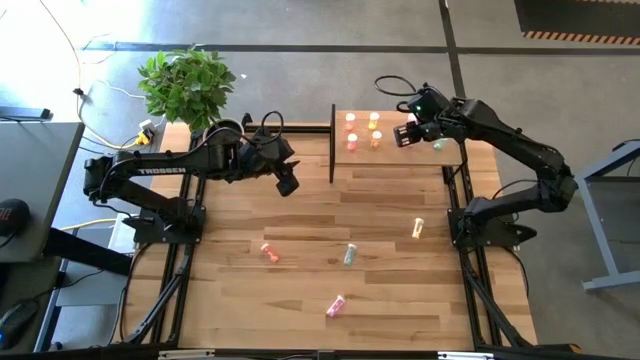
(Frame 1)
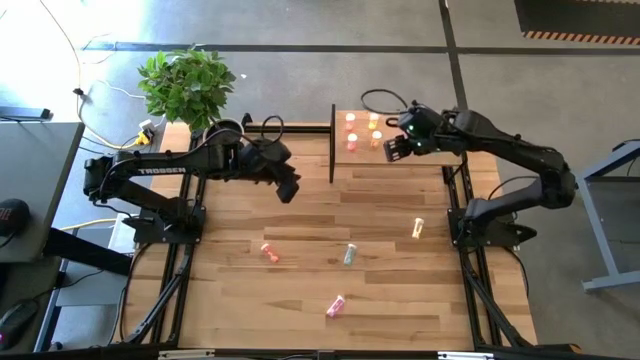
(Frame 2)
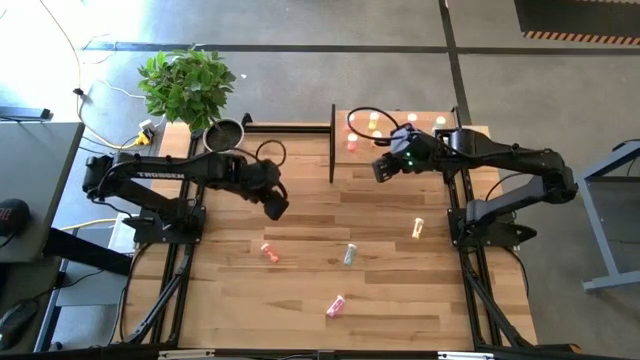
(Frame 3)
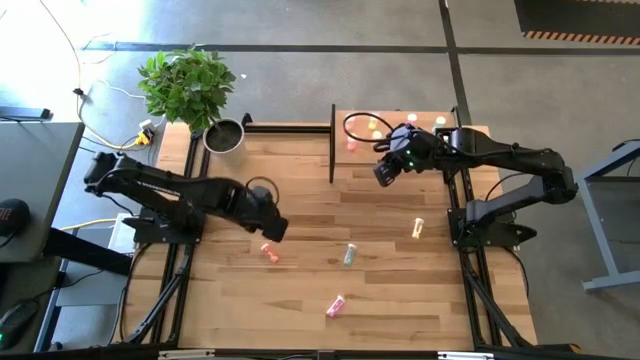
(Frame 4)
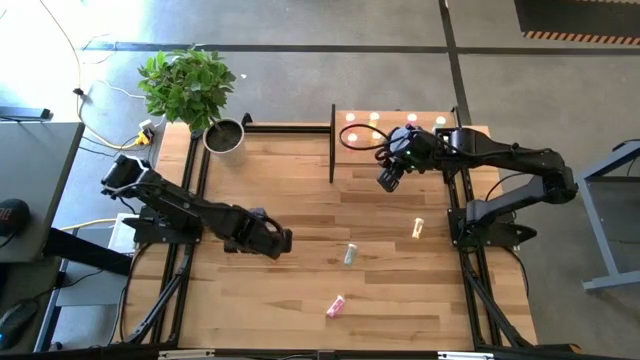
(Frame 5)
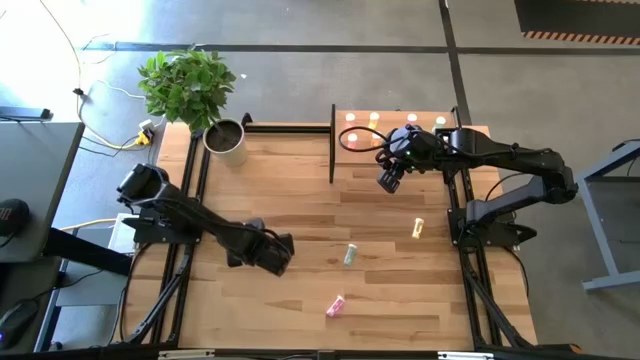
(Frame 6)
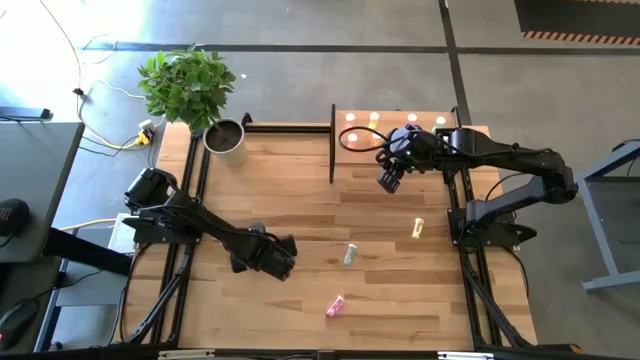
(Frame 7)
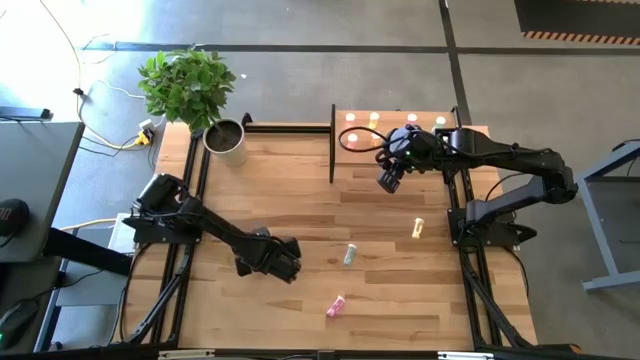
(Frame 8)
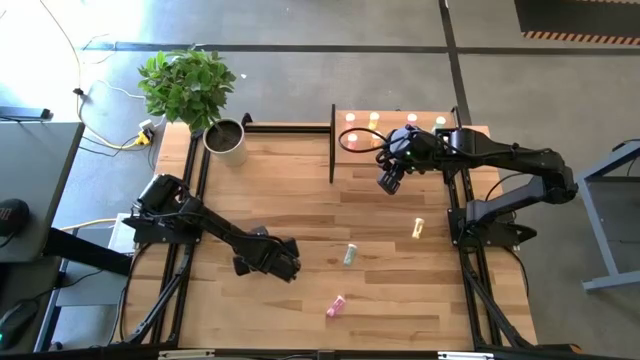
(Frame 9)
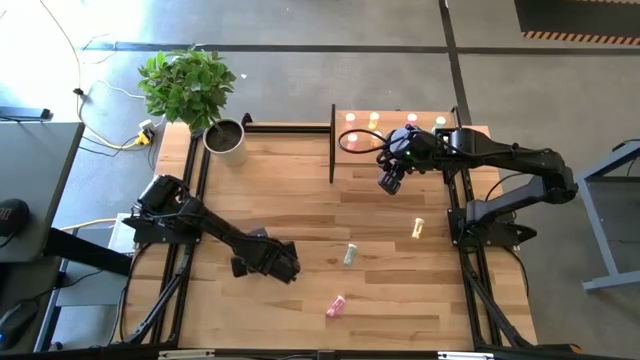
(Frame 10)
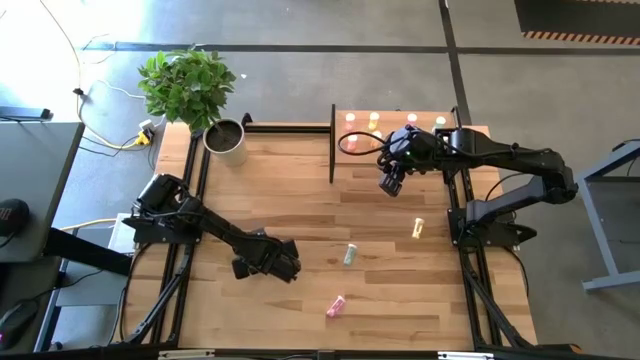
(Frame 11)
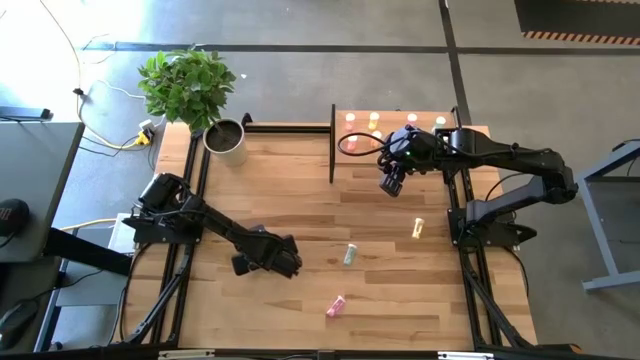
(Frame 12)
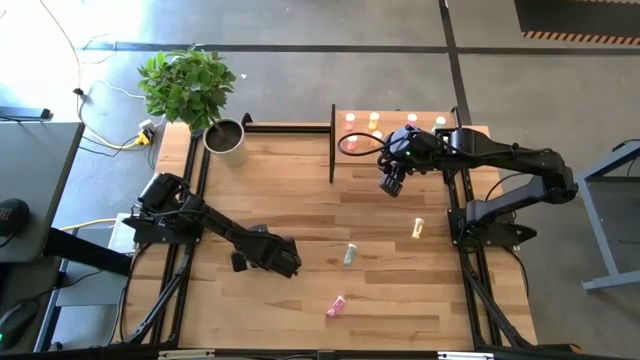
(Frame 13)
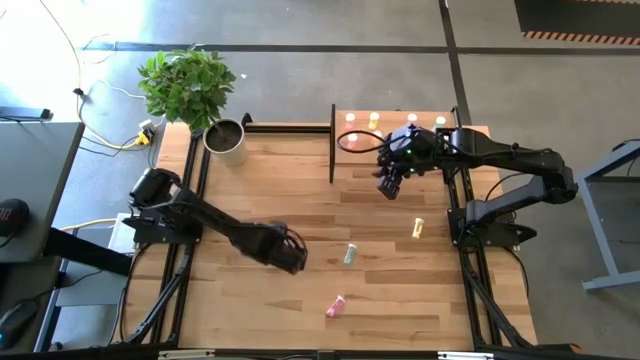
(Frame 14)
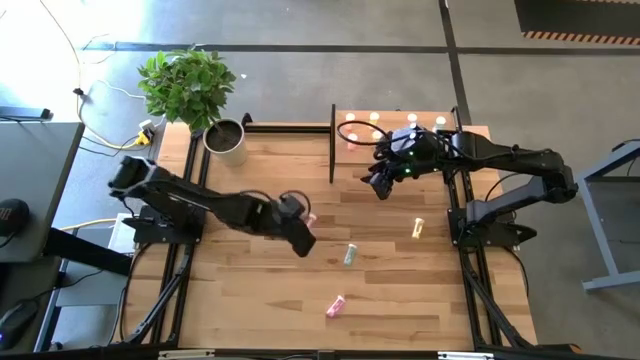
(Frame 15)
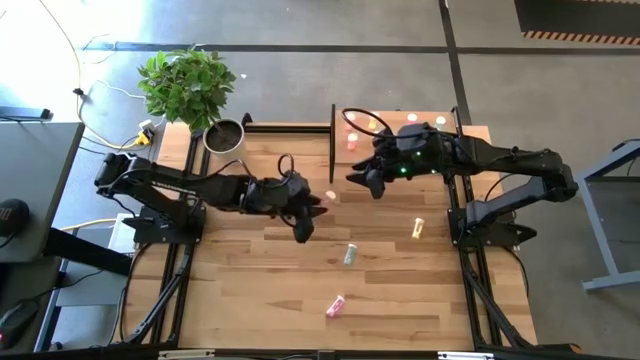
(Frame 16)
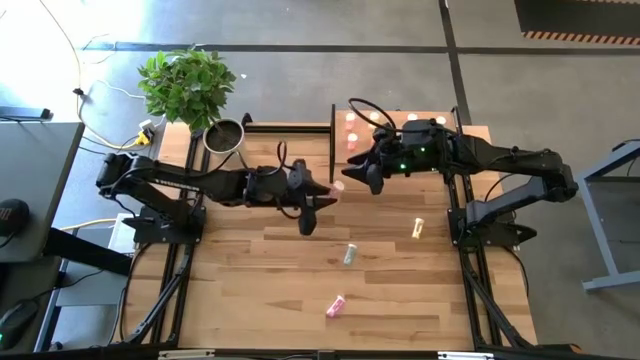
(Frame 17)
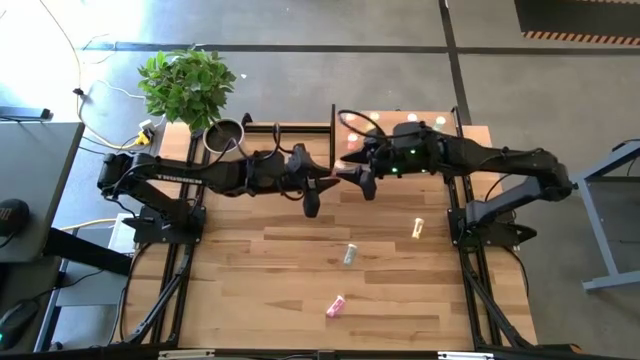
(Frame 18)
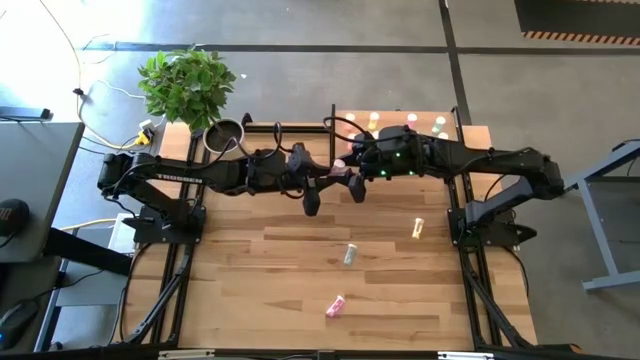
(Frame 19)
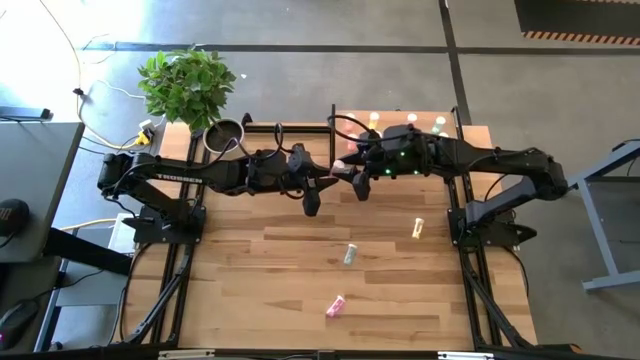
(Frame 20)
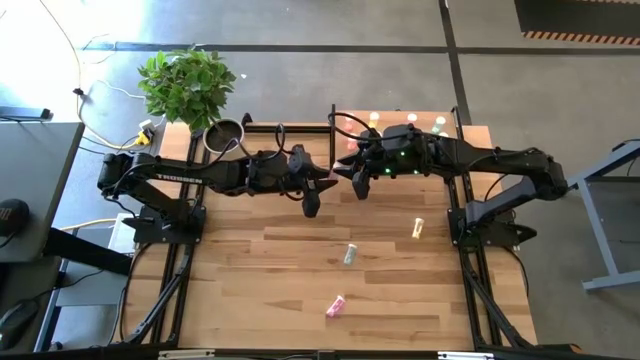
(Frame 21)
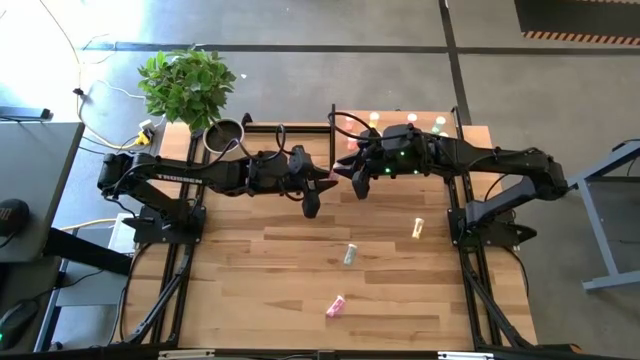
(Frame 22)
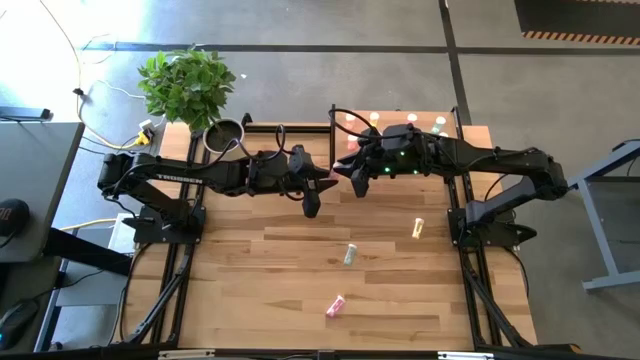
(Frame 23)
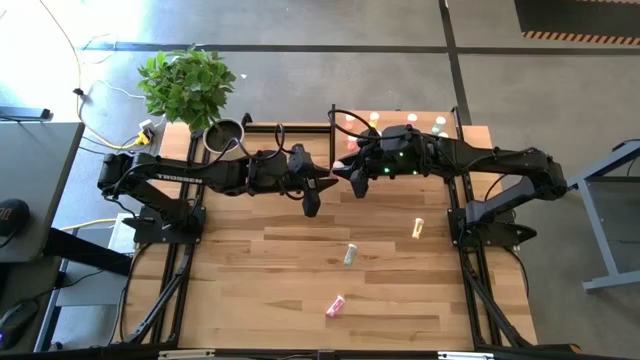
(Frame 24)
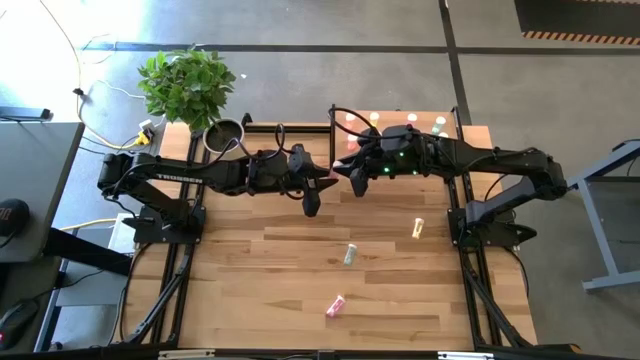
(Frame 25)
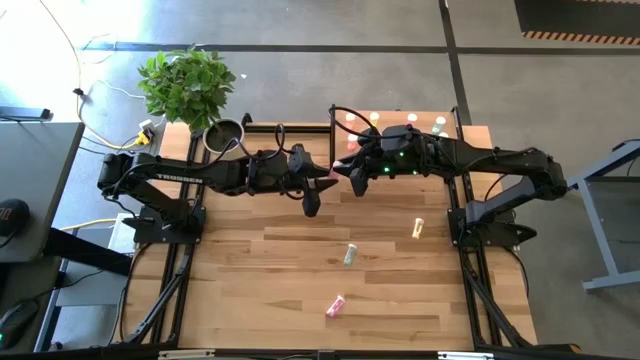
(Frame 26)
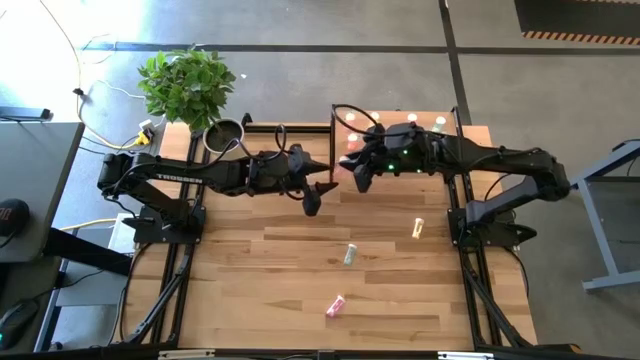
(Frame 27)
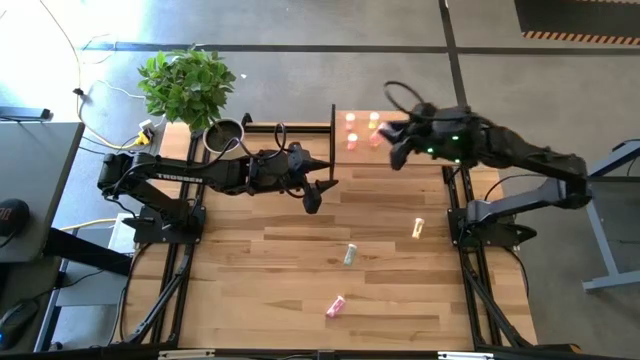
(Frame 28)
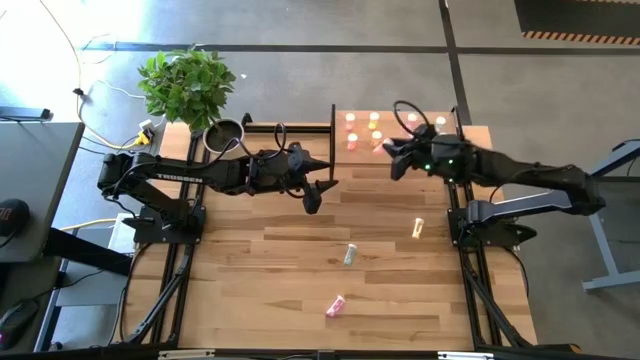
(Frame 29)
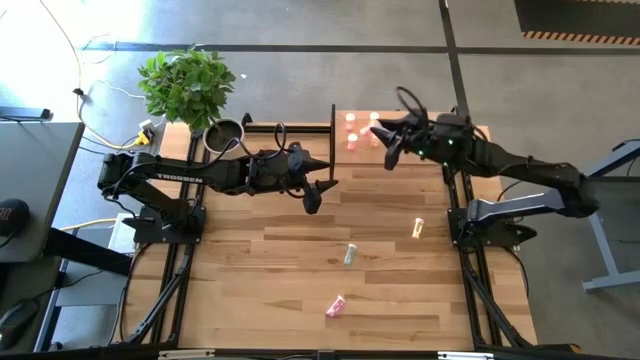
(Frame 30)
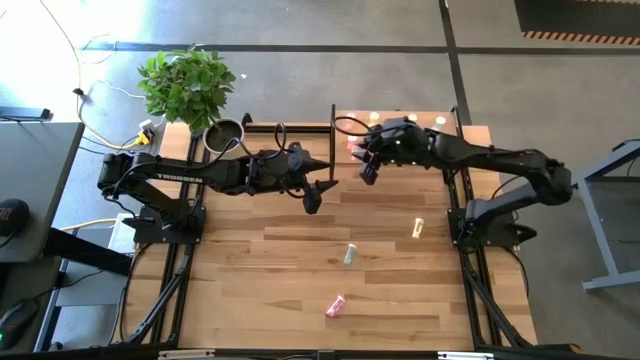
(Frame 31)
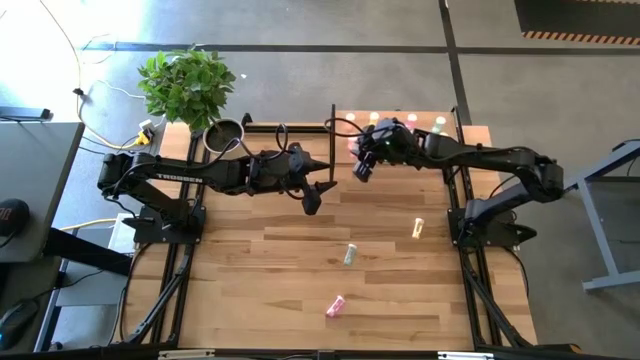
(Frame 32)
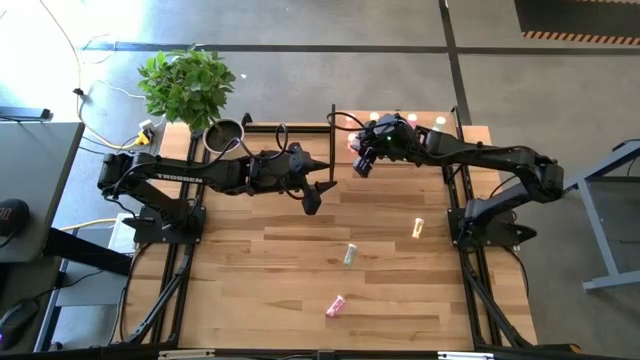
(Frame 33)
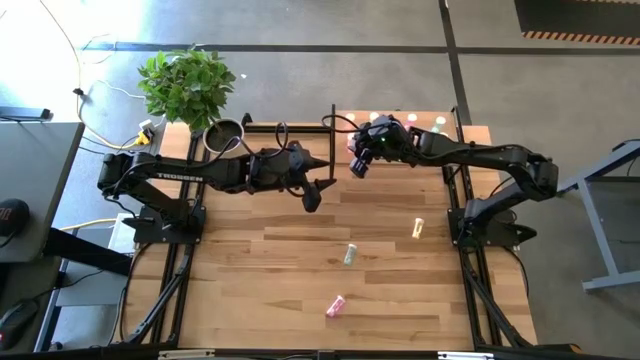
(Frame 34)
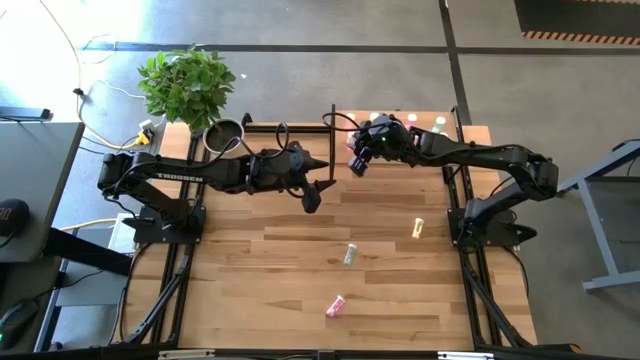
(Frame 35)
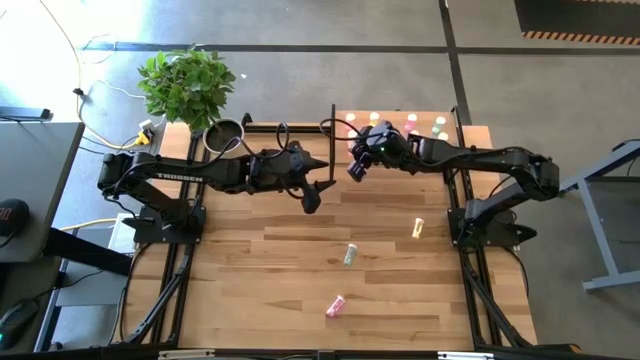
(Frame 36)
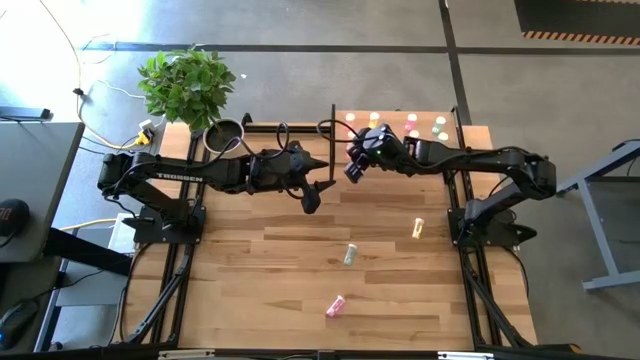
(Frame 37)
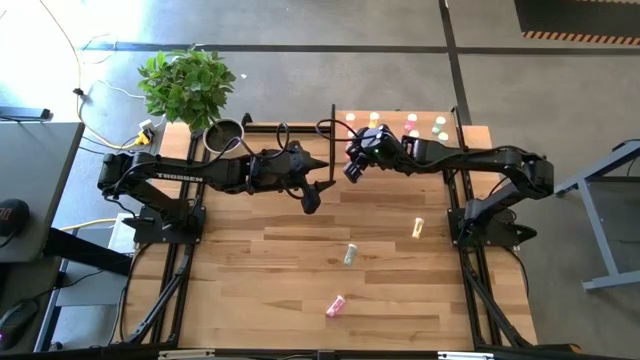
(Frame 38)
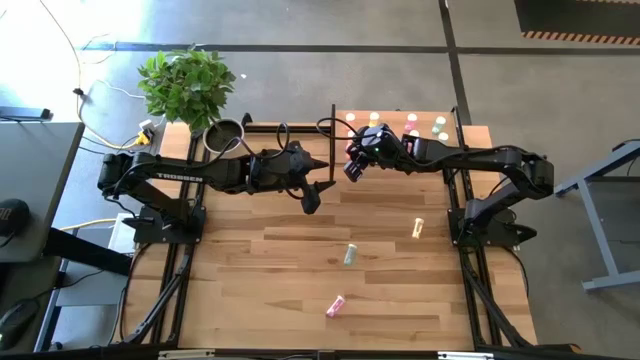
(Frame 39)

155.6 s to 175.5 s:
Task: Pick and place medicine bottles onto shelf by color
Put the pink medicine bottle aligned with the other pink medicine bottles on the shelf
